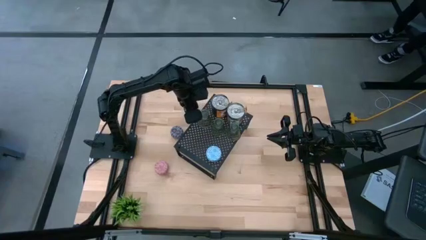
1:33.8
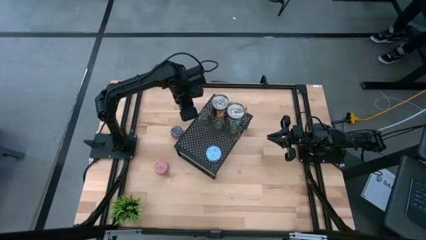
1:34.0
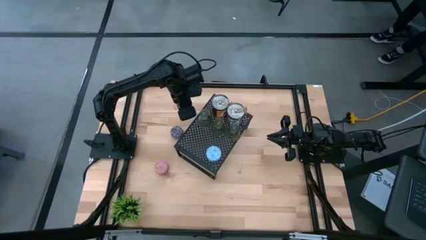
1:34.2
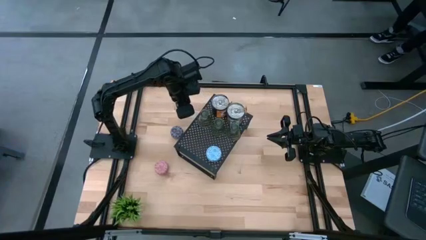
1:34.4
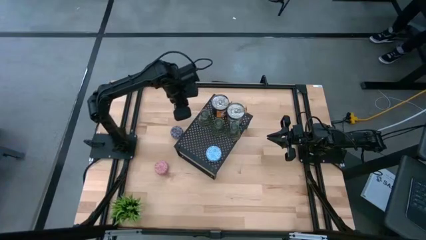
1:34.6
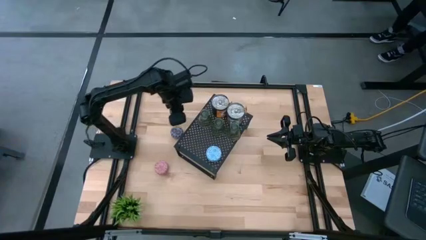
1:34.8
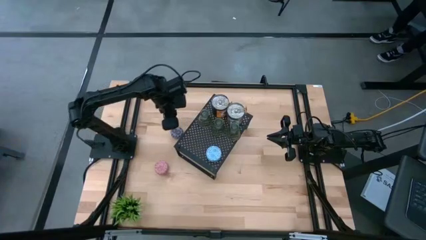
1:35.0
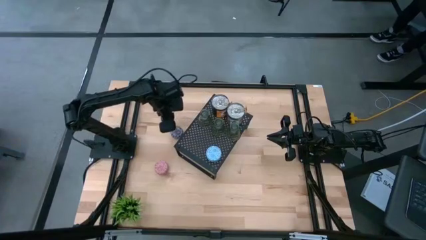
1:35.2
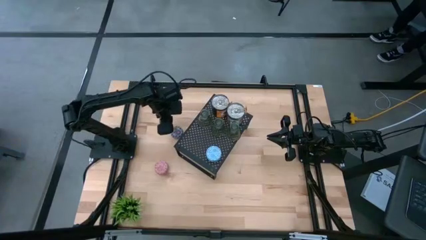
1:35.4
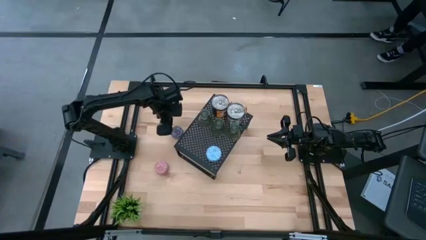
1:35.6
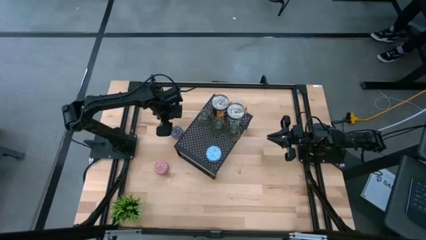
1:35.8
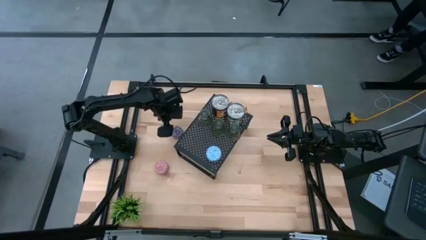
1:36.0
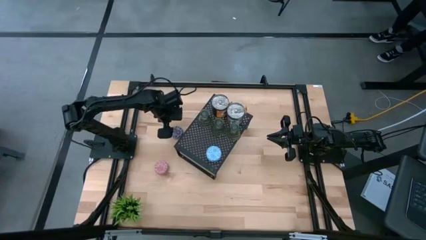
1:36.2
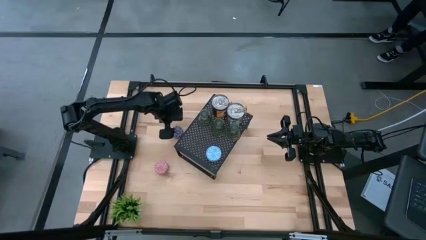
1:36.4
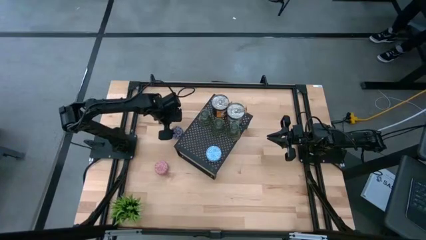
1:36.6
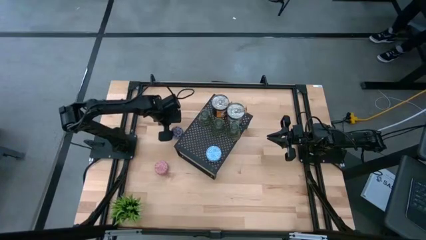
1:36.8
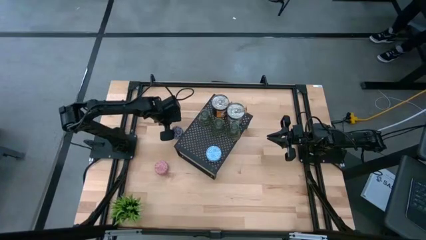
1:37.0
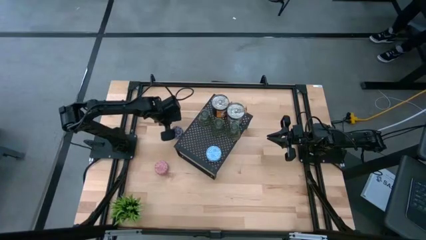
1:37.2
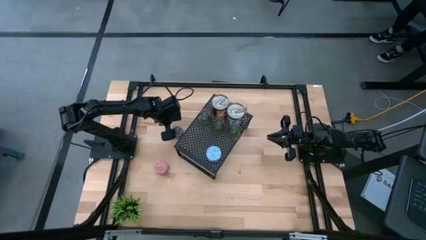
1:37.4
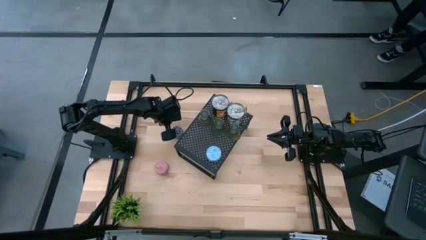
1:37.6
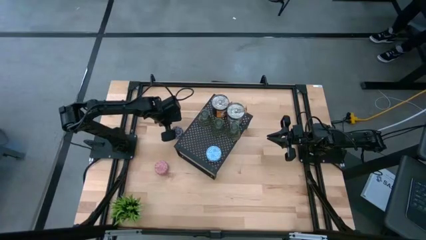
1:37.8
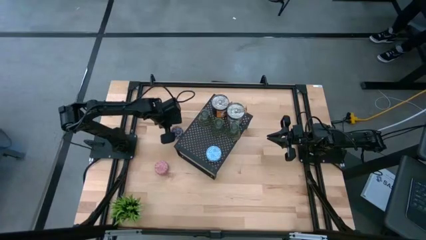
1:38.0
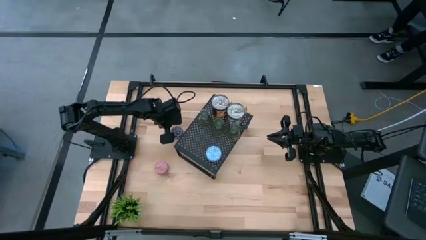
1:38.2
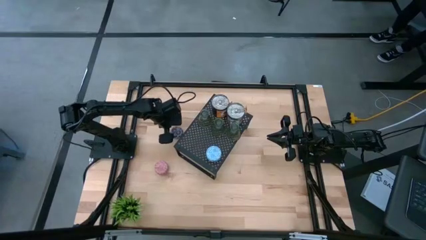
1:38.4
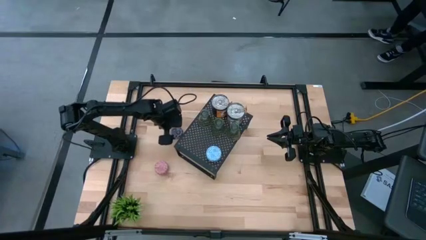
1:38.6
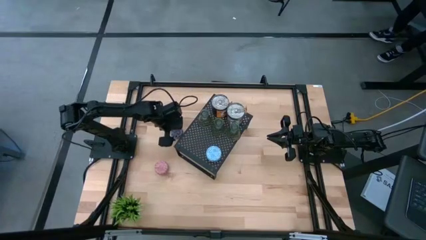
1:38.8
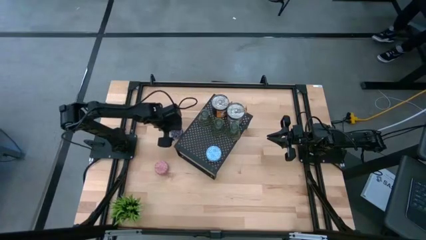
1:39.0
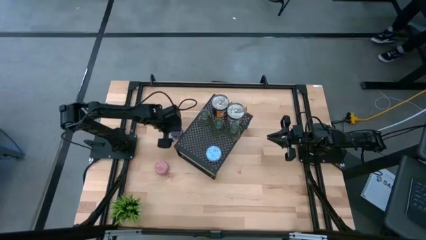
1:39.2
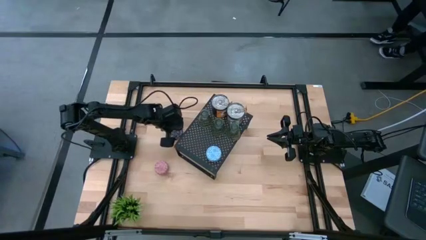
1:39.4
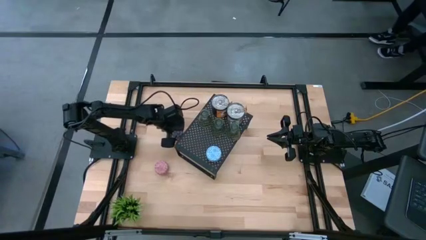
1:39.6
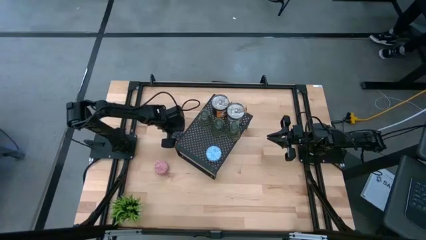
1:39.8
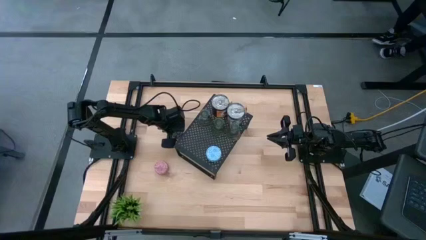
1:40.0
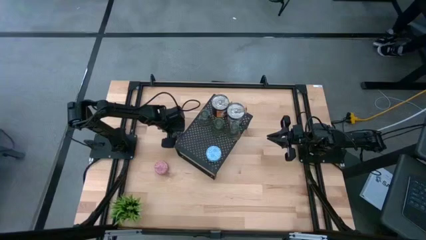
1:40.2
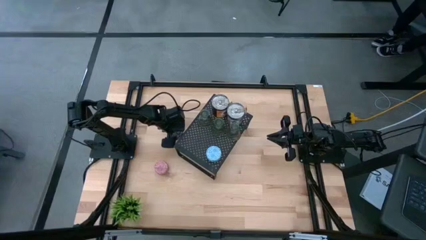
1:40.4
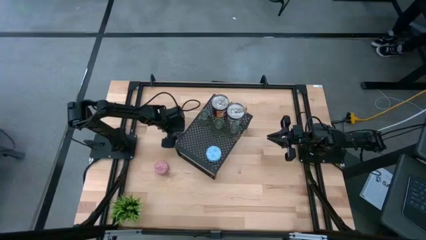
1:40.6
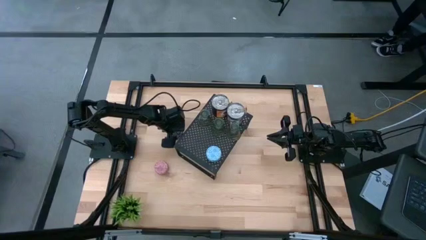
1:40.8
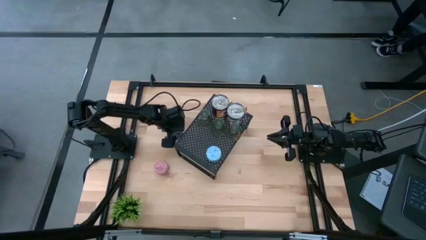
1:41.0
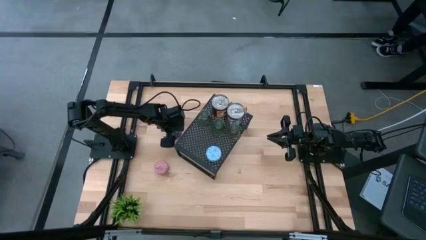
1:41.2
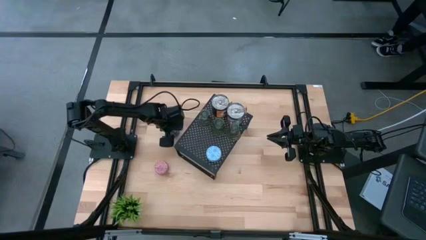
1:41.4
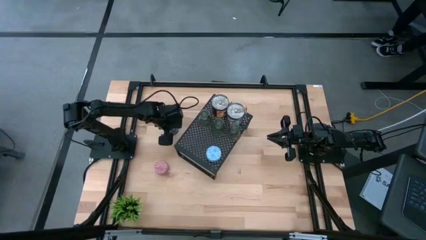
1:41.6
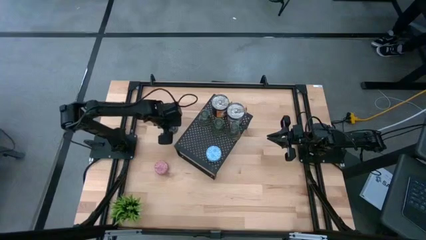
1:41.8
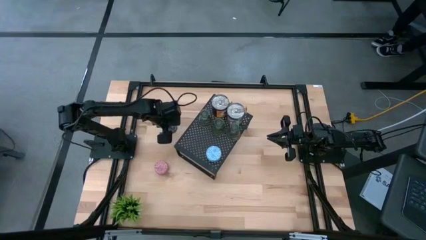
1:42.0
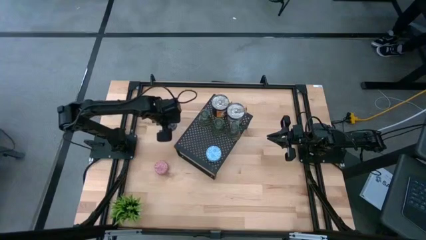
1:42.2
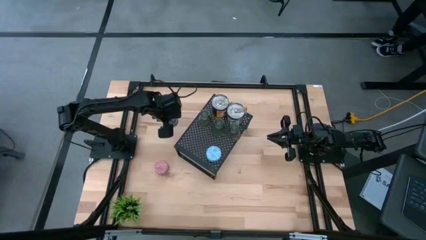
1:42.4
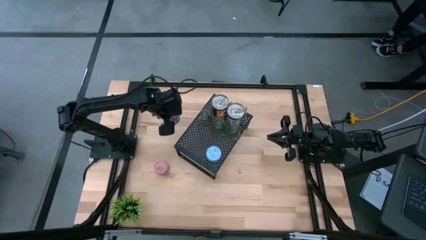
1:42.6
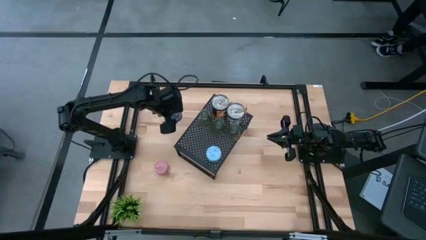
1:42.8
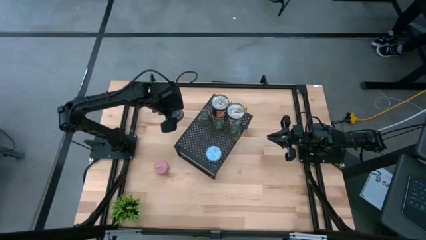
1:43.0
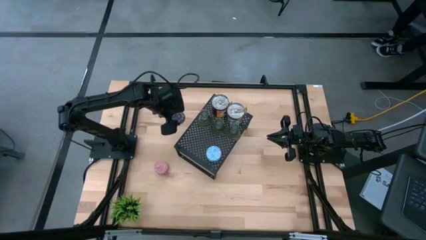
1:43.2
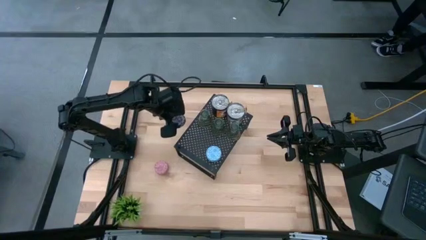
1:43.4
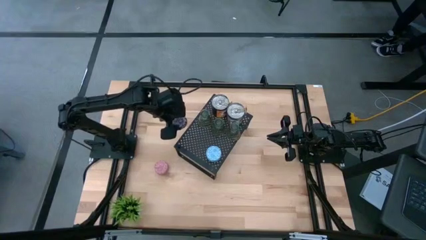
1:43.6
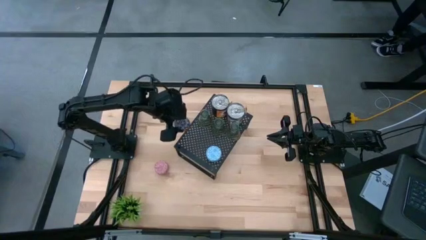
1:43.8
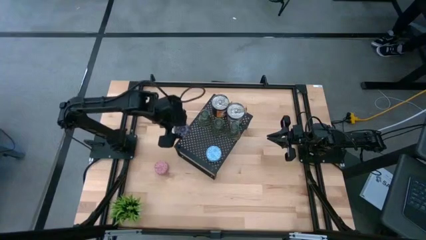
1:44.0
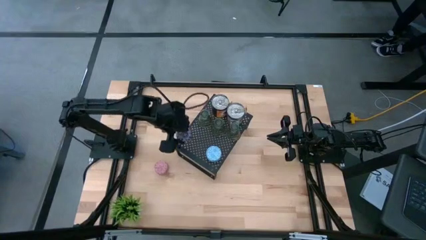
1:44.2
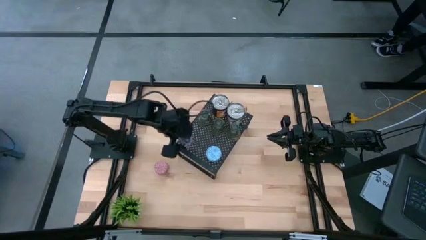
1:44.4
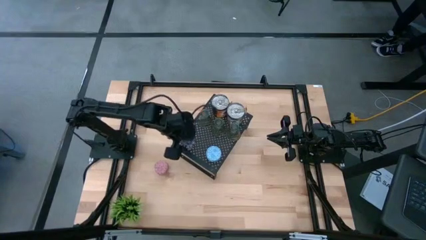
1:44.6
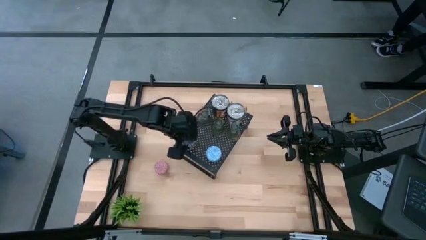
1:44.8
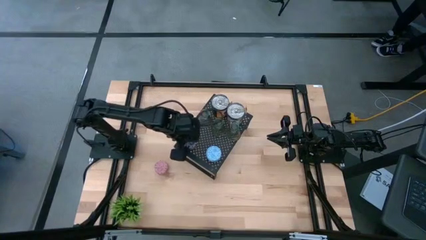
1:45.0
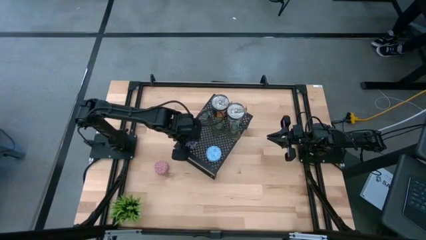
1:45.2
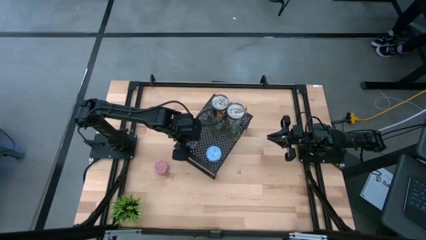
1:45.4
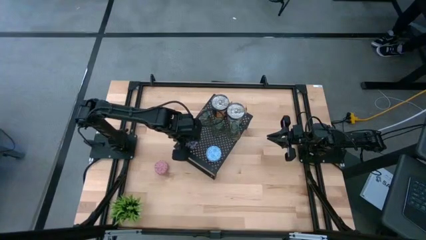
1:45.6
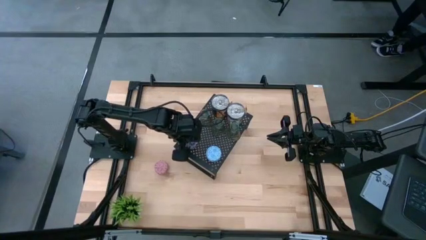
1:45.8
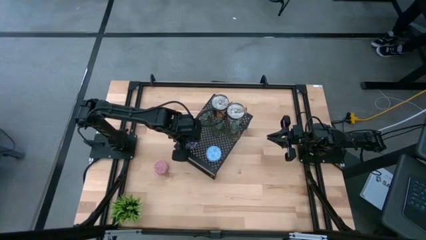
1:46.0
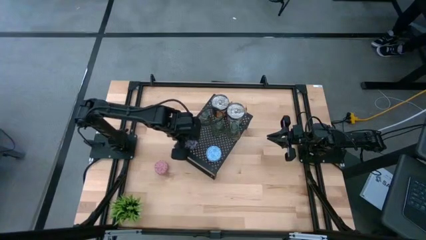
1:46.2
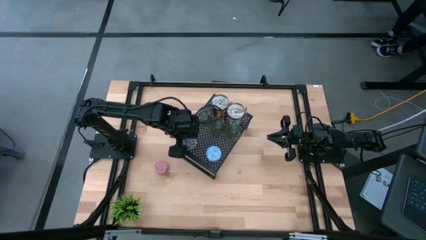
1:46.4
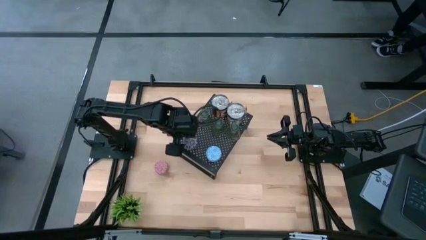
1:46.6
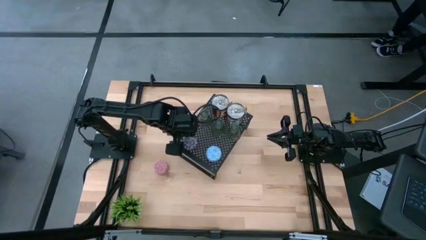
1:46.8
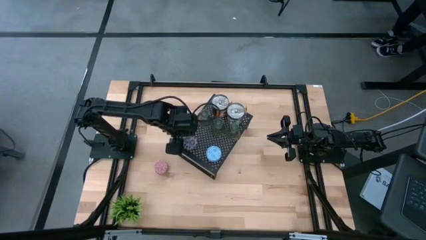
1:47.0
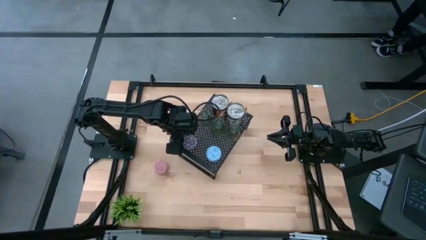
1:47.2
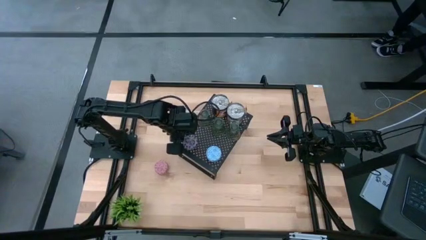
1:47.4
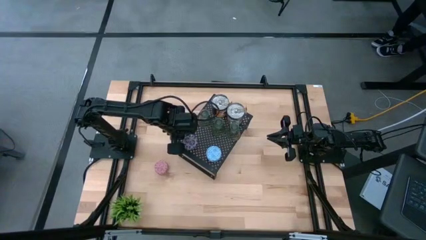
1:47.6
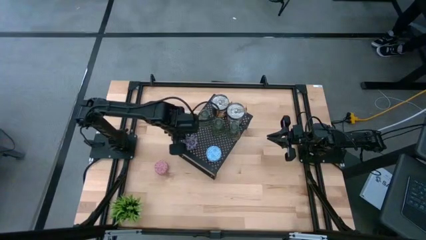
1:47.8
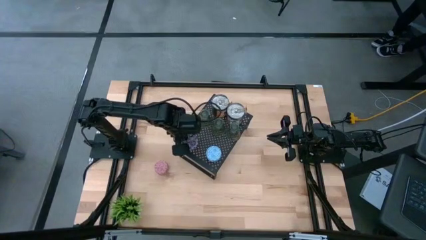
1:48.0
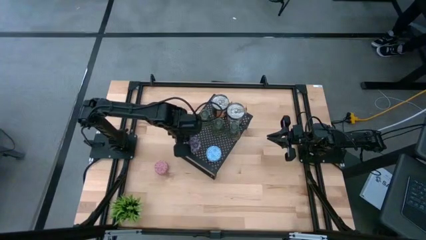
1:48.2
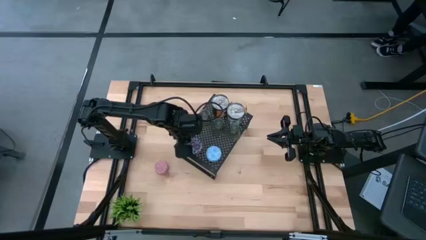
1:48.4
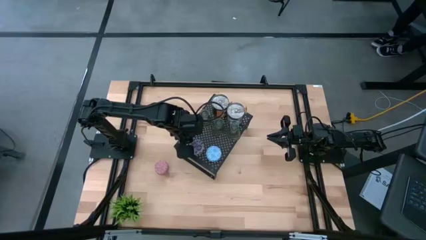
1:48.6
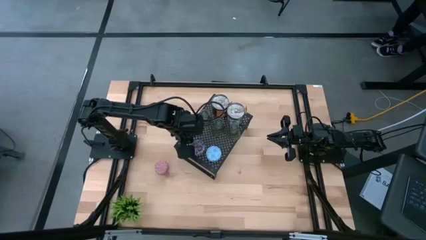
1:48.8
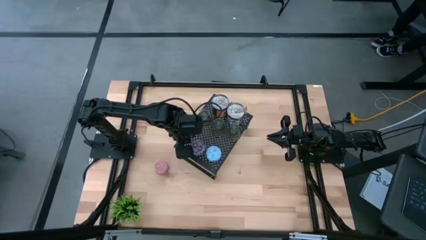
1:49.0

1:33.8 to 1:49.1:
Task: Pick & Place candle stick holders
Put the red scented candle on the shelf

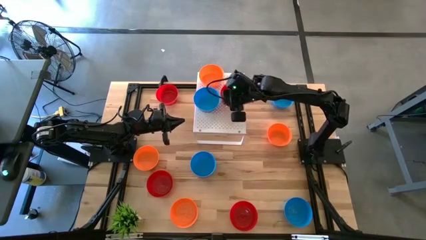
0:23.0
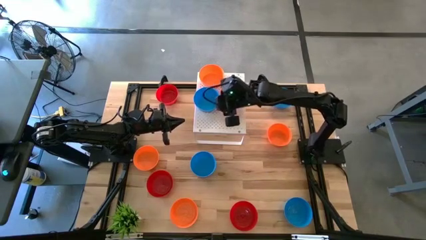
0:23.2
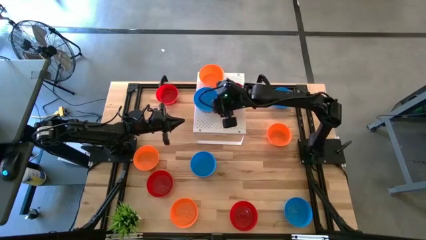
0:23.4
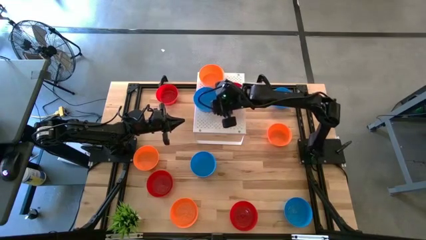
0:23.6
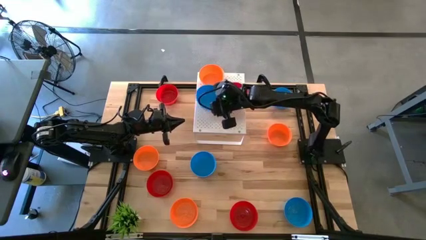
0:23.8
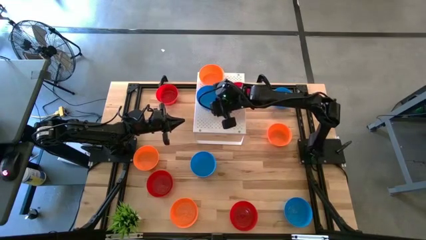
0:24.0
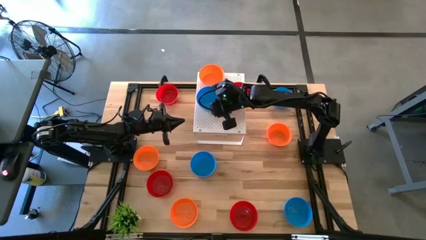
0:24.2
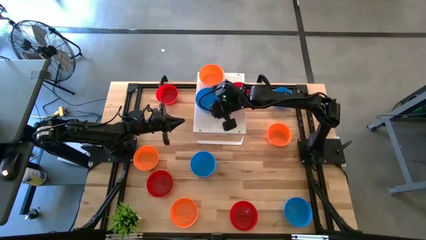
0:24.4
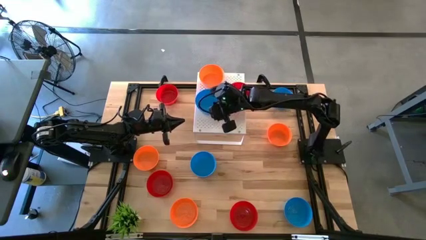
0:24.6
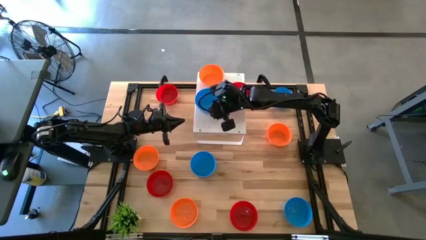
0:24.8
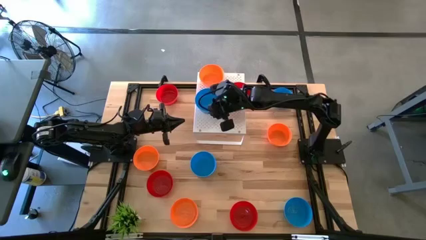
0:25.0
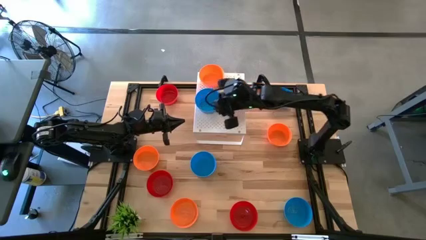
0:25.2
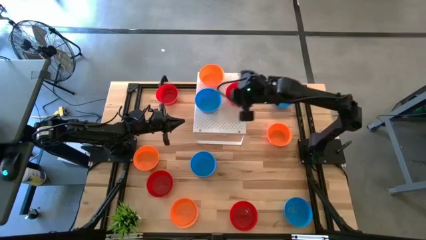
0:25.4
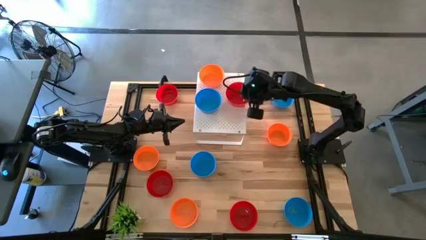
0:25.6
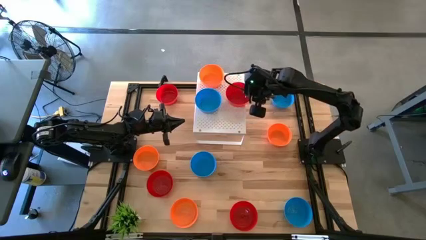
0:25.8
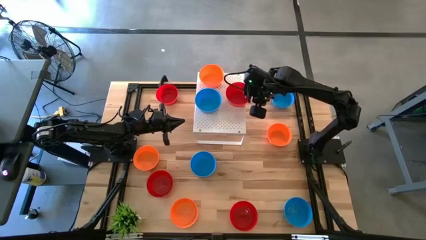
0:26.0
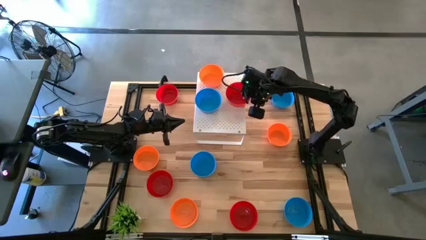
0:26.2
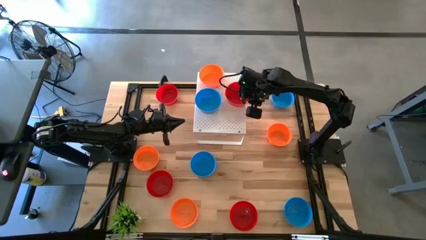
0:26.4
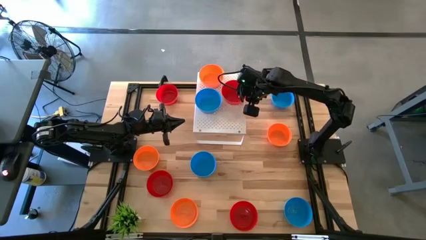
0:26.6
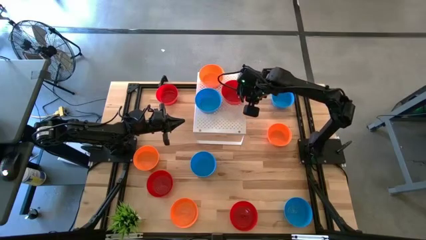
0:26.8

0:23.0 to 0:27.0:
Task: Pick & Place Mini bowls
Adjust the bowls on the shelf
